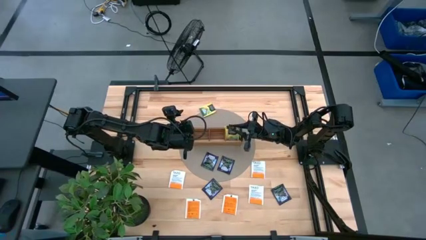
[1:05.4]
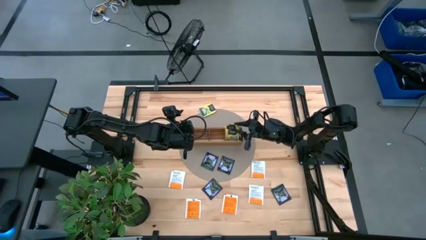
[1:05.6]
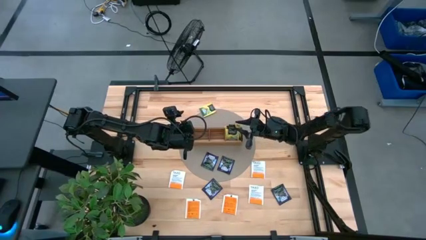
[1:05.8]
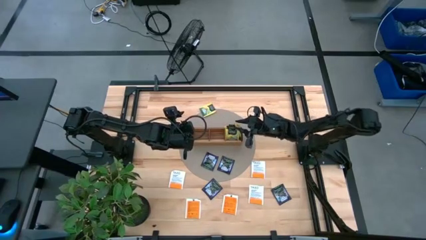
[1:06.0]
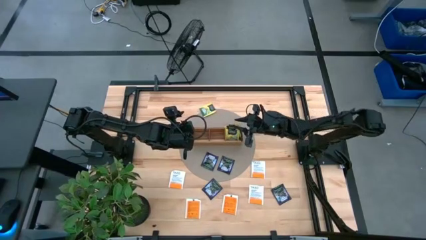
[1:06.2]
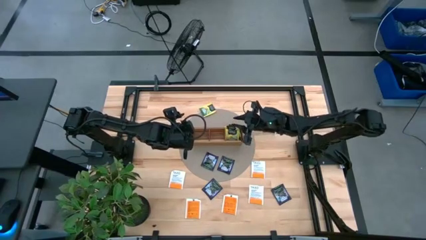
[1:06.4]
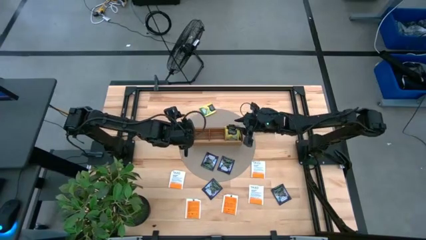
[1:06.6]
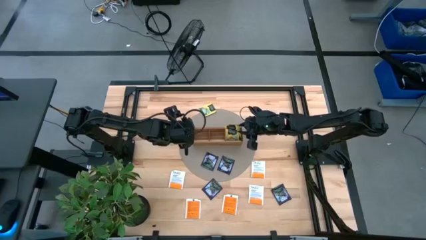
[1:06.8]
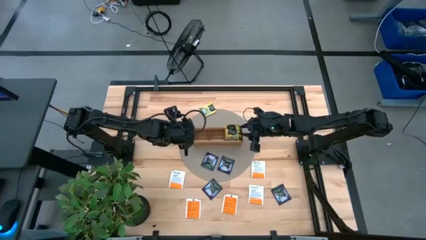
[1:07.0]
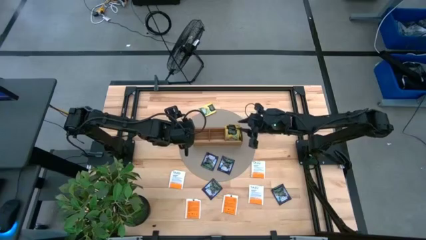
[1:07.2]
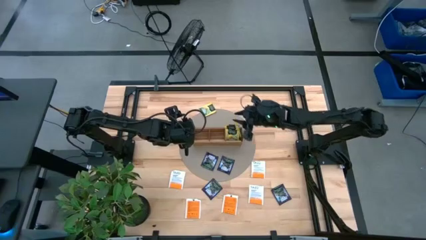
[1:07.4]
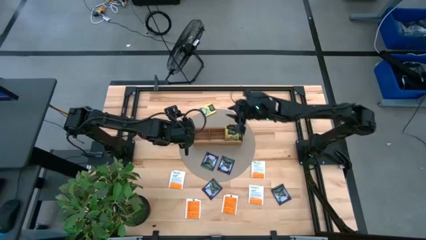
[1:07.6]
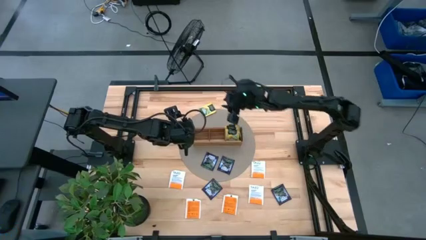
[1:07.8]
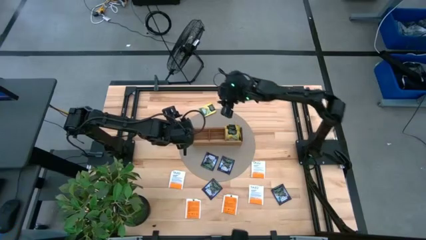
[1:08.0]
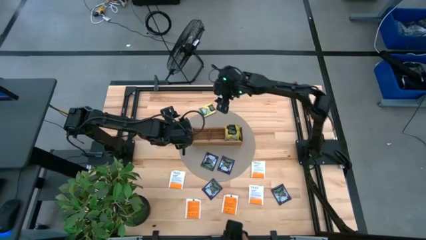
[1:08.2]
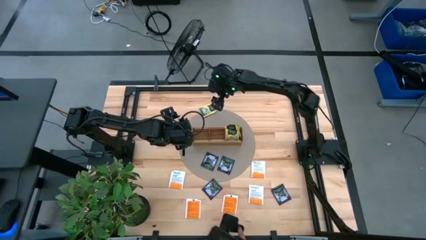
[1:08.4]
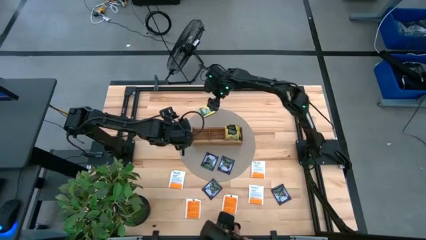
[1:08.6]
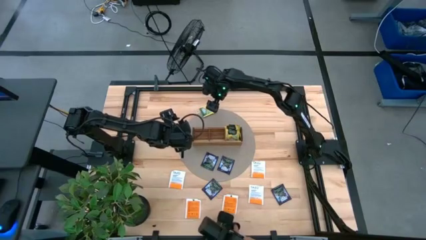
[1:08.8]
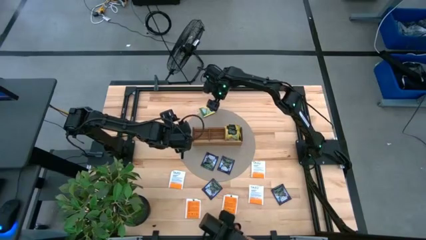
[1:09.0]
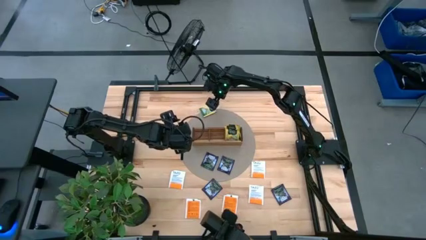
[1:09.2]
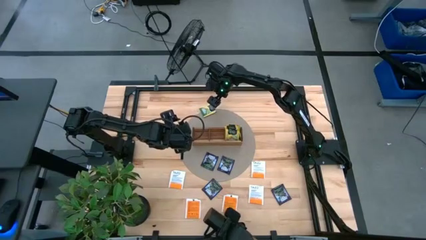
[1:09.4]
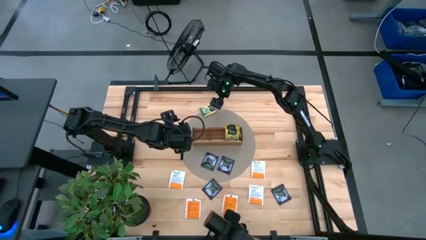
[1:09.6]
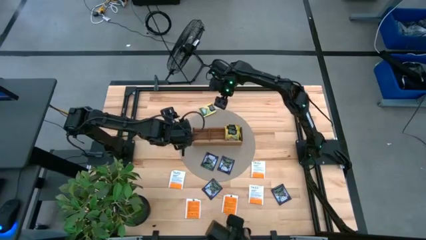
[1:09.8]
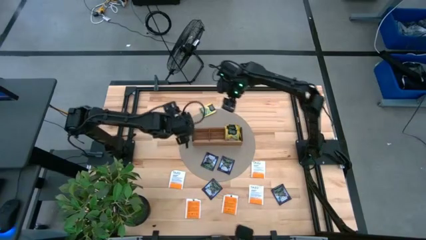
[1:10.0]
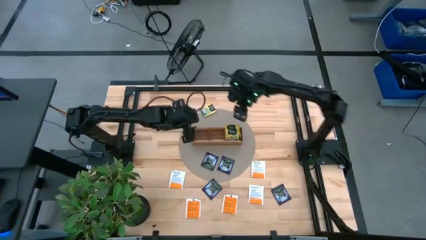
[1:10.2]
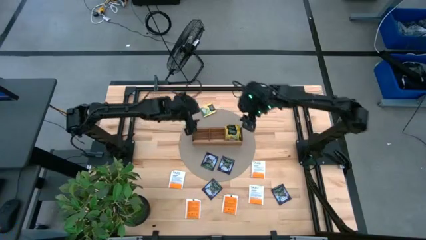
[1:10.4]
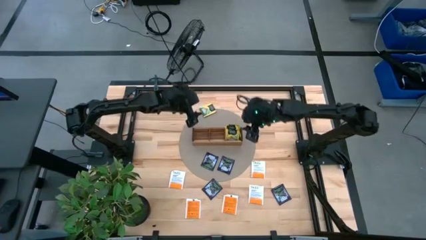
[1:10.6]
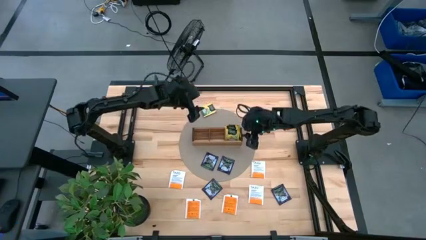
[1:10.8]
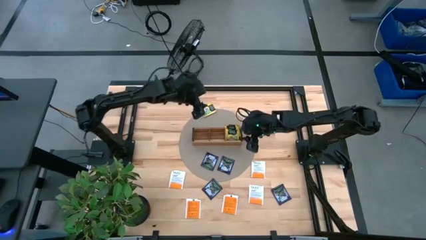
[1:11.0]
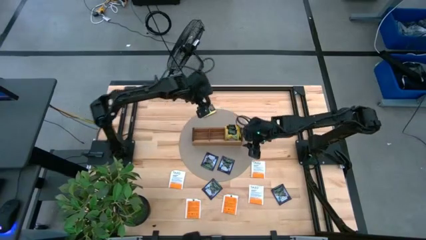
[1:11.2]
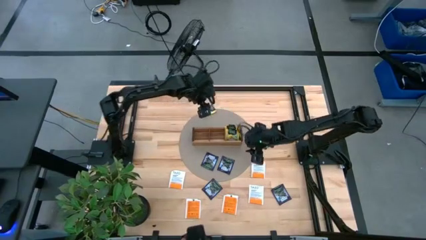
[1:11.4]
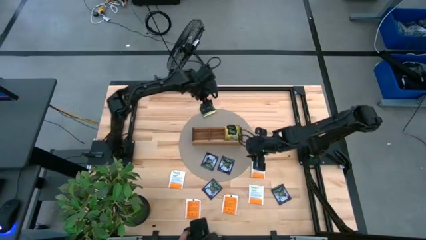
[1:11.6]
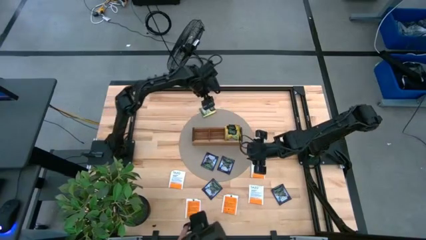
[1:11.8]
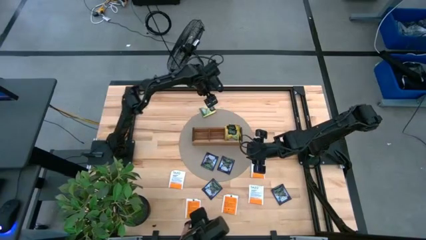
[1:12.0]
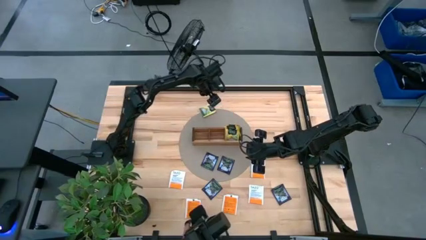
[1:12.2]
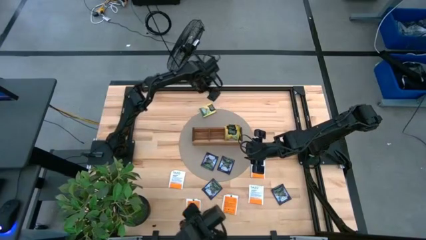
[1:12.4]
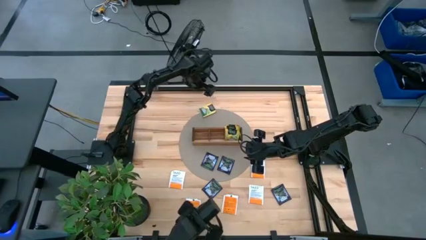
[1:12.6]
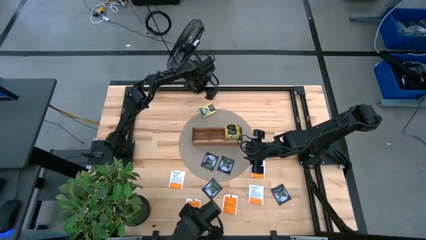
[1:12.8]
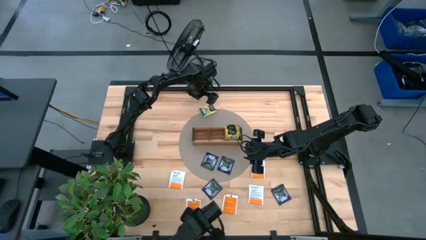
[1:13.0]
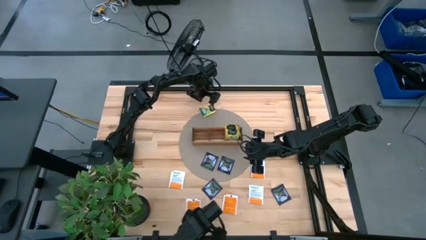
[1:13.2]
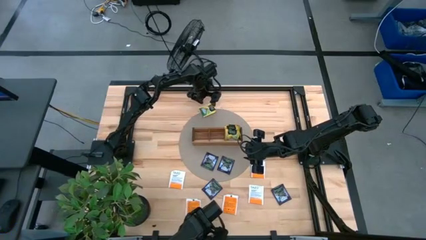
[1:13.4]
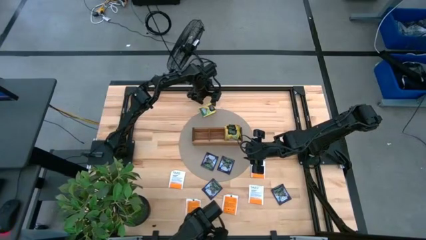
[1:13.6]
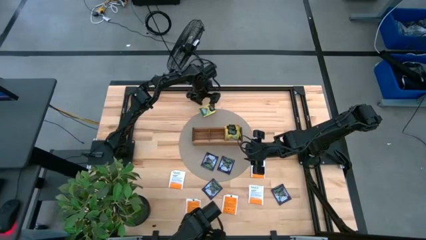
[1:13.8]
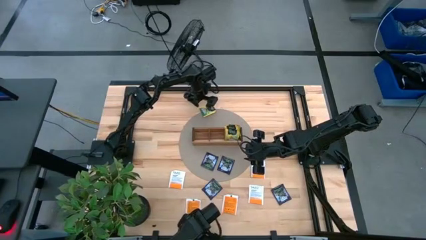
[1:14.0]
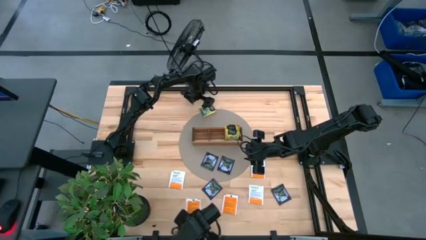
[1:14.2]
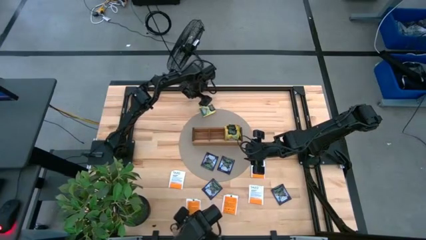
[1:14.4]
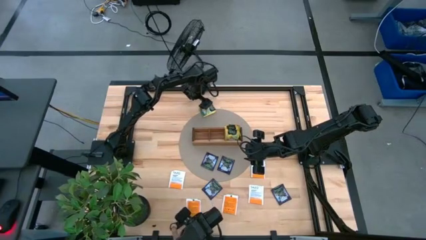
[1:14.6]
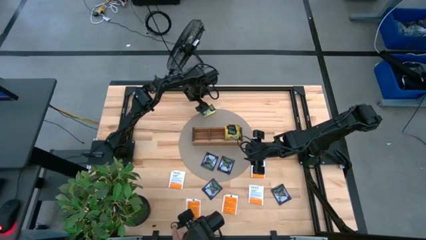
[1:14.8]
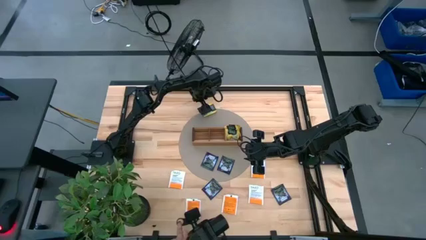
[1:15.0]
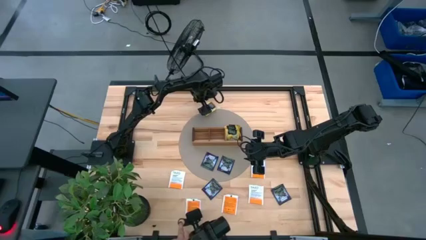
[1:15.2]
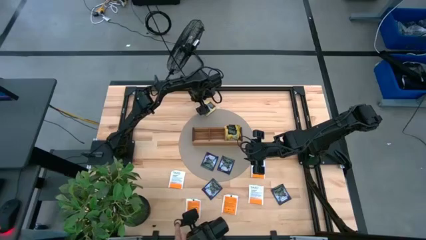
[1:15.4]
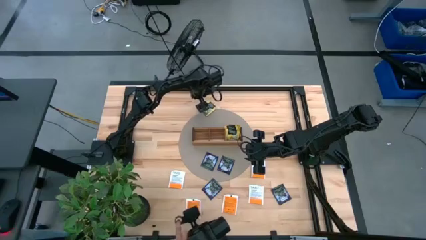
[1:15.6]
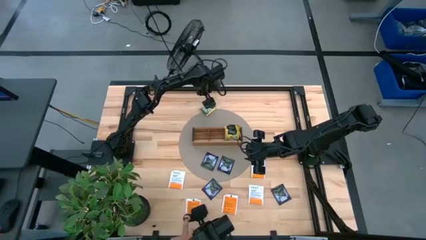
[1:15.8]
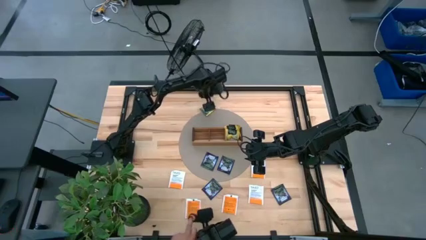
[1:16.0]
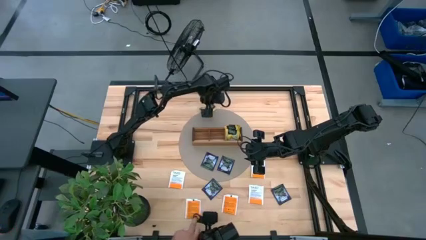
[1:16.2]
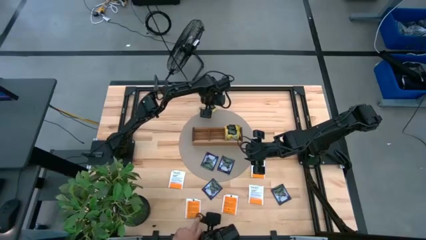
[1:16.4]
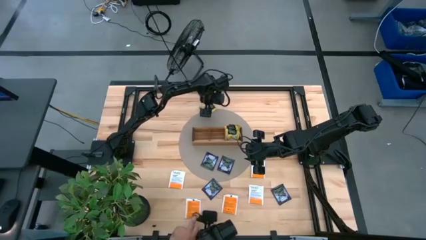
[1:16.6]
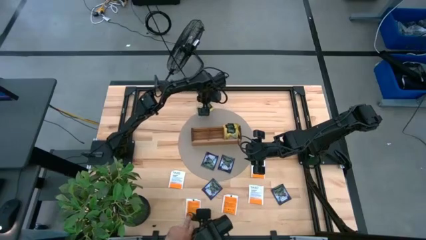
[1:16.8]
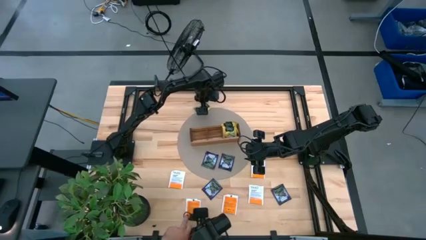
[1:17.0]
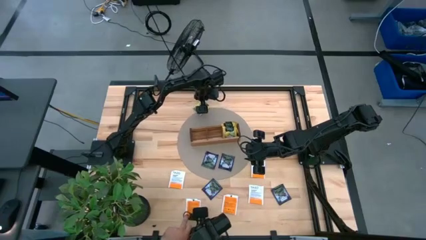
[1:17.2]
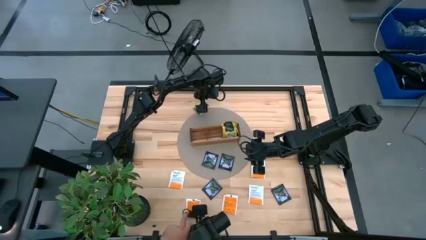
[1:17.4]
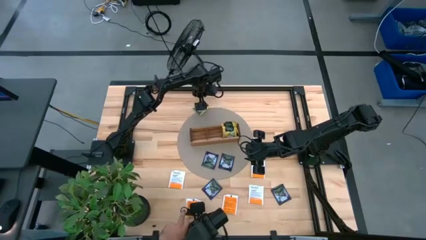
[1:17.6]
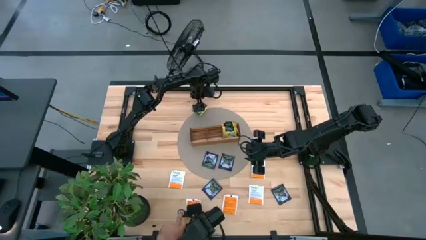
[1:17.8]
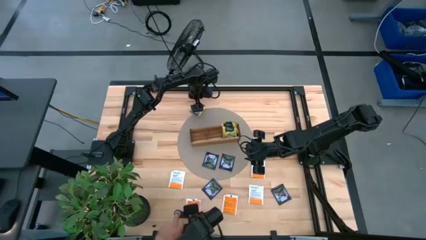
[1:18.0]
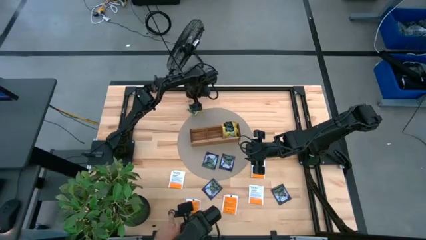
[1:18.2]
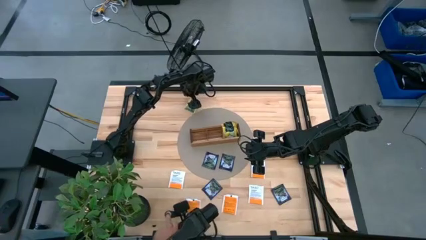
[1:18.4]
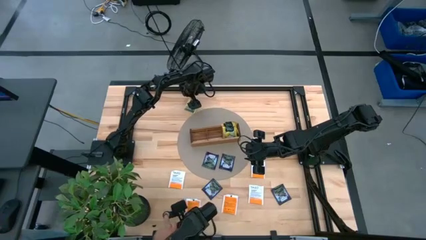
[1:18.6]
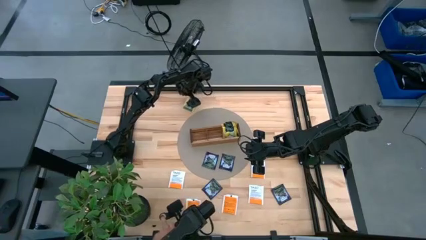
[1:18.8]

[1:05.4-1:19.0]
Task: Pick & Place Tea
Put the yellow tea bag into the right section of the wooden organizer

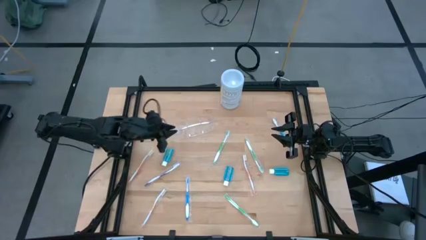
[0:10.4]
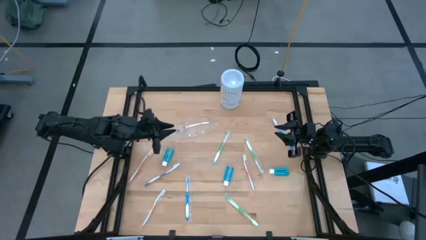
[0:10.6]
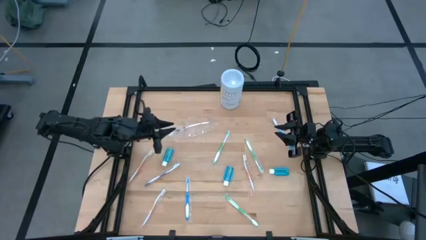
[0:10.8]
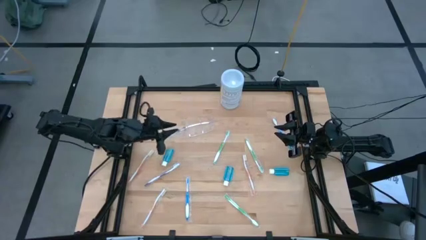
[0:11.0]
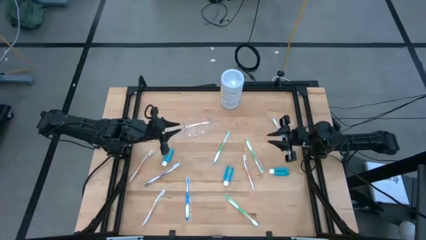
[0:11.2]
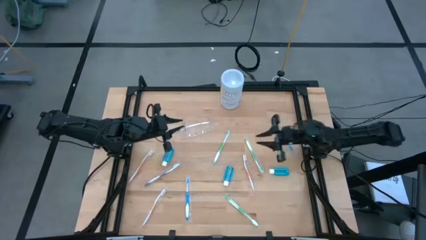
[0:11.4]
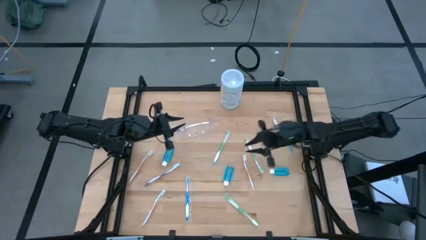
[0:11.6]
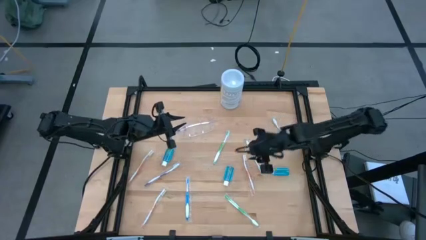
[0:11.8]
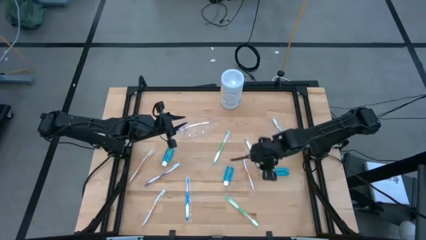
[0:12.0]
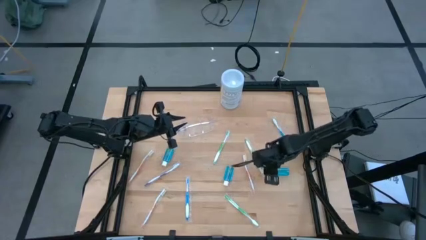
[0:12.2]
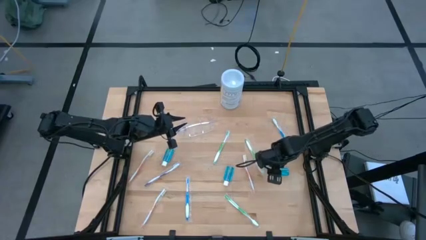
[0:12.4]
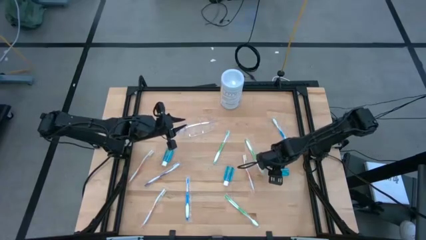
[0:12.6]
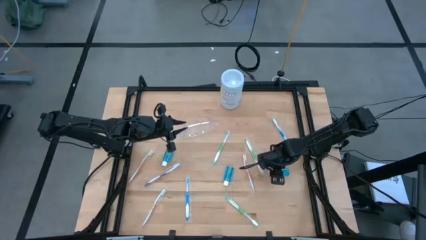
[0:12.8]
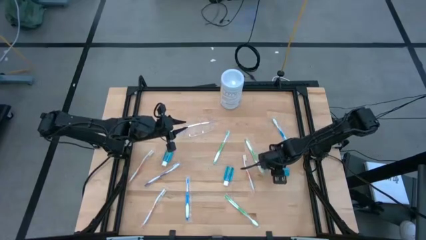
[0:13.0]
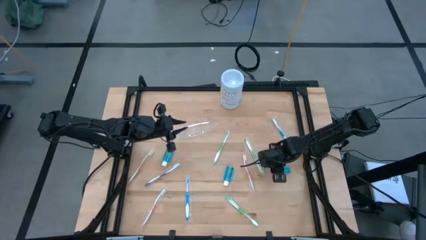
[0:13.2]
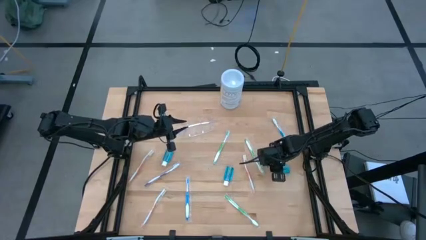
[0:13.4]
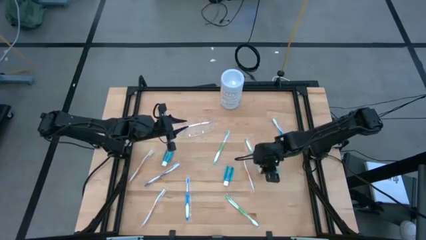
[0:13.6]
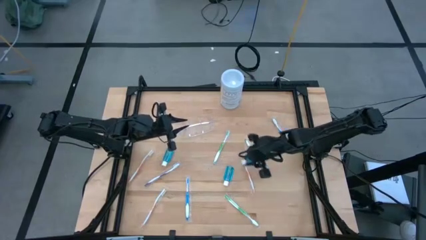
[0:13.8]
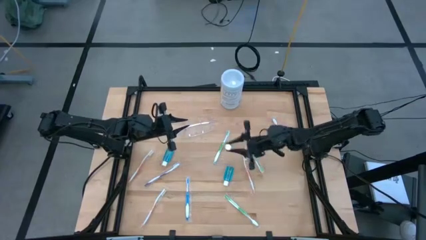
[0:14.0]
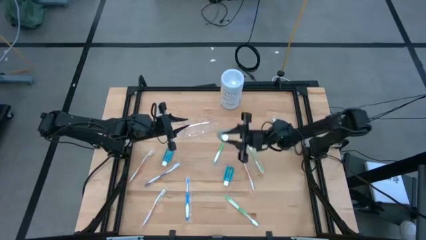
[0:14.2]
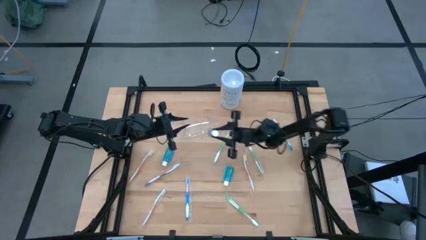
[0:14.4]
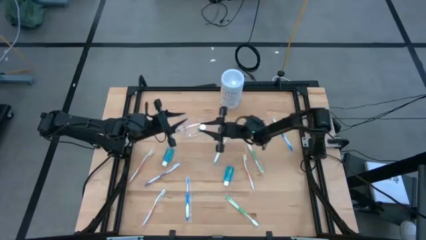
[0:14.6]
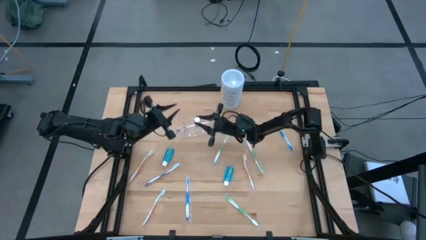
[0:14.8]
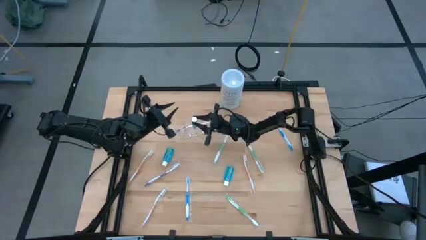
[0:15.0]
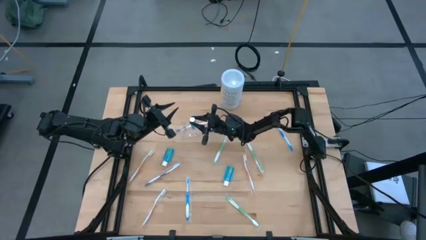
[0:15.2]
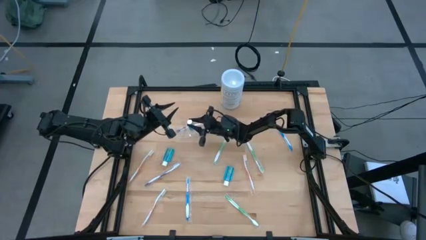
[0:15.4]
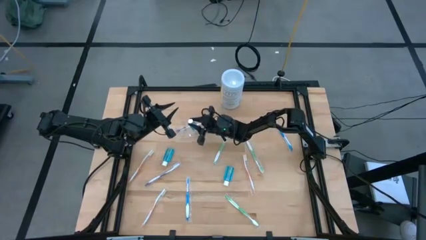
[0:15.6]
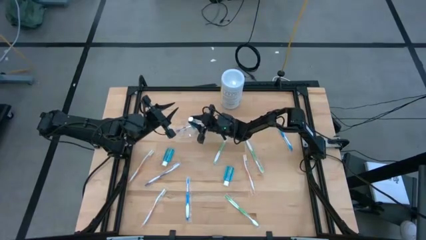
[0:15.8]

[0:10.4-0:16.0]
Task: Pick & Place toothbrushing station
Put the right blue mouthwash into the transparent organizer
